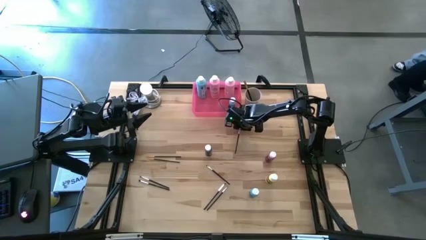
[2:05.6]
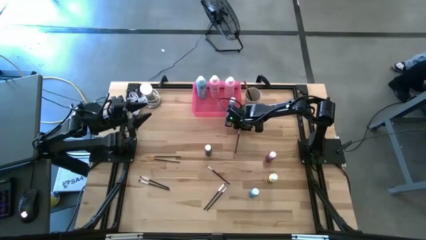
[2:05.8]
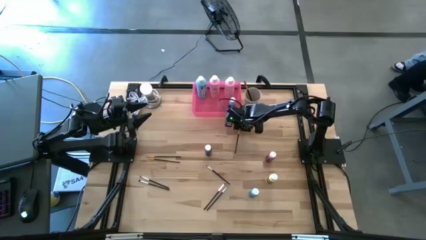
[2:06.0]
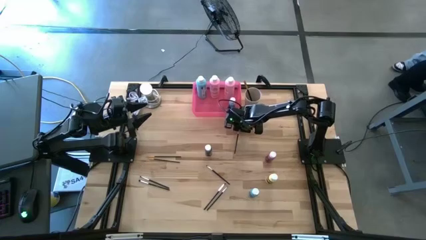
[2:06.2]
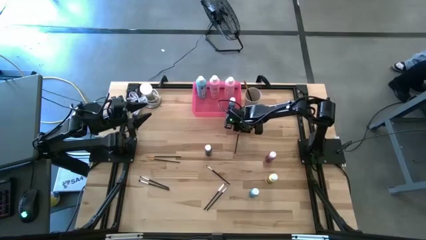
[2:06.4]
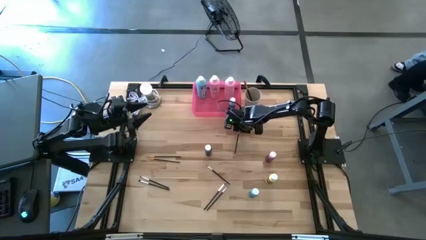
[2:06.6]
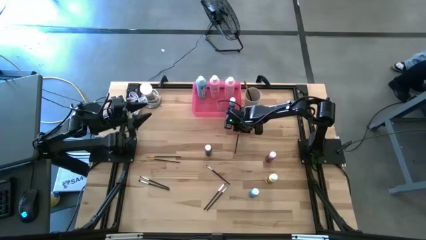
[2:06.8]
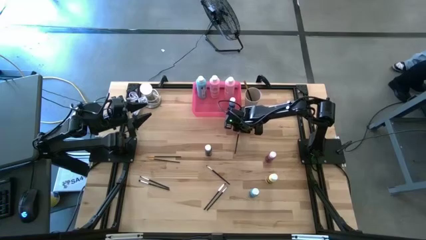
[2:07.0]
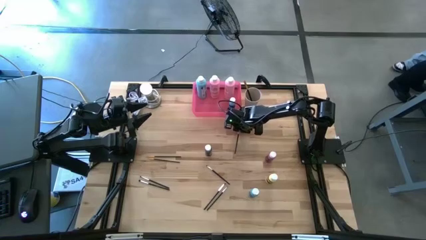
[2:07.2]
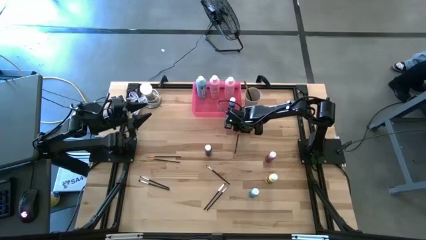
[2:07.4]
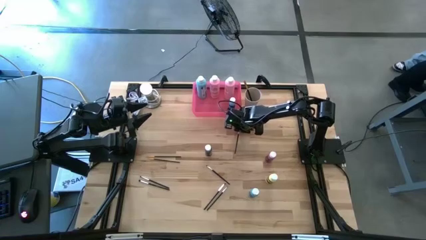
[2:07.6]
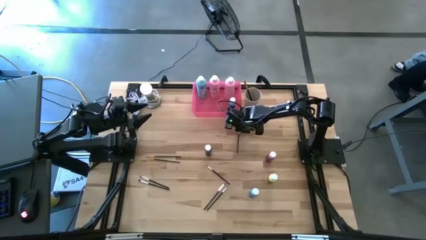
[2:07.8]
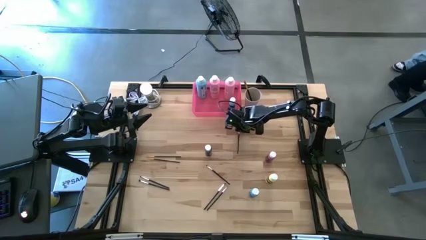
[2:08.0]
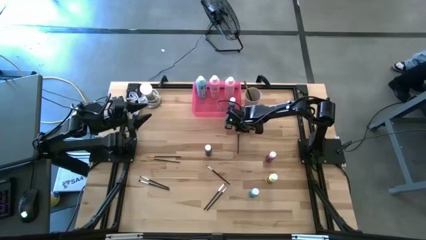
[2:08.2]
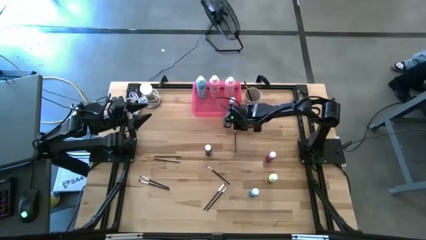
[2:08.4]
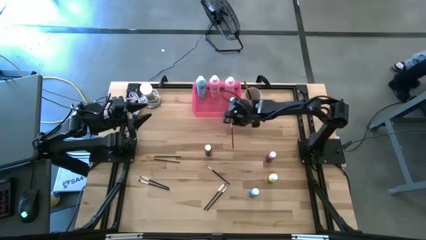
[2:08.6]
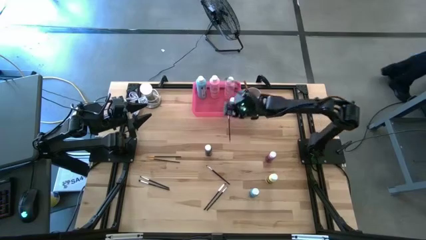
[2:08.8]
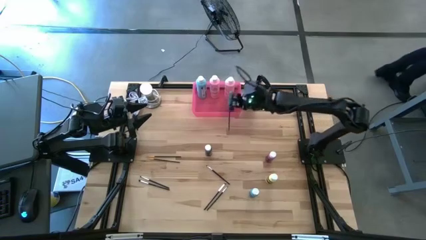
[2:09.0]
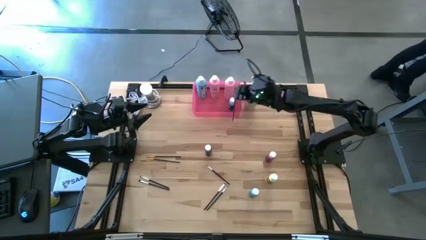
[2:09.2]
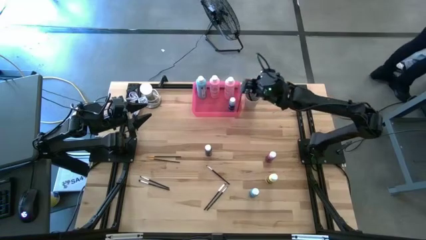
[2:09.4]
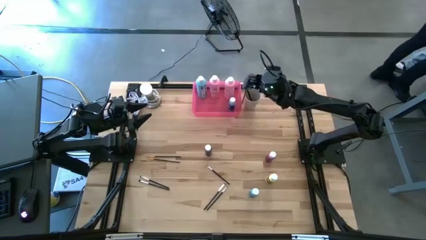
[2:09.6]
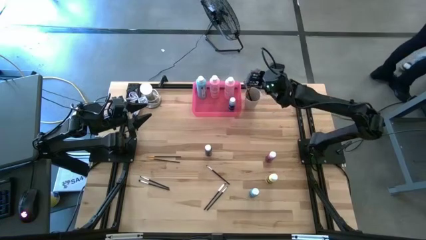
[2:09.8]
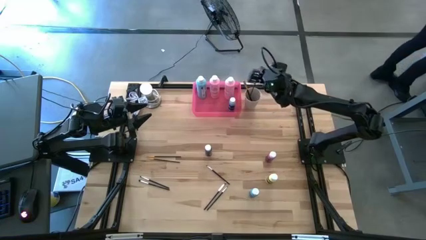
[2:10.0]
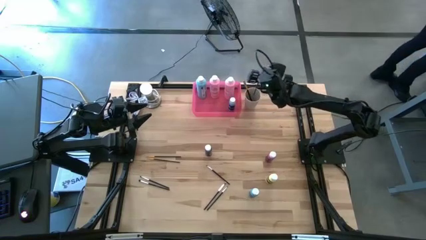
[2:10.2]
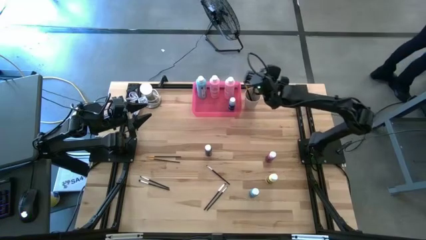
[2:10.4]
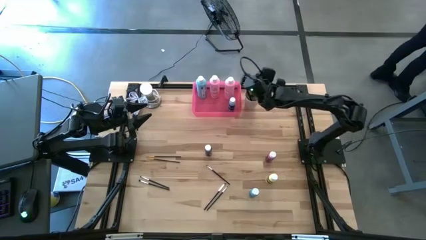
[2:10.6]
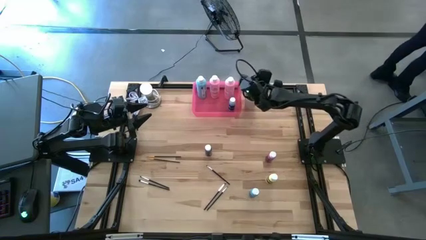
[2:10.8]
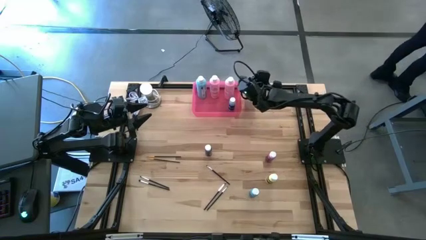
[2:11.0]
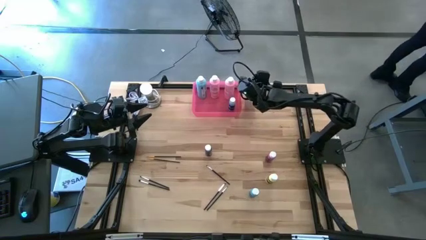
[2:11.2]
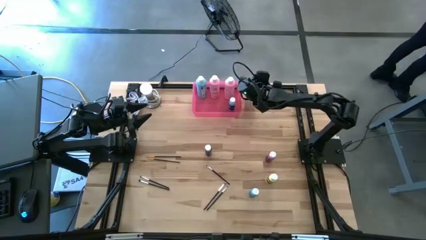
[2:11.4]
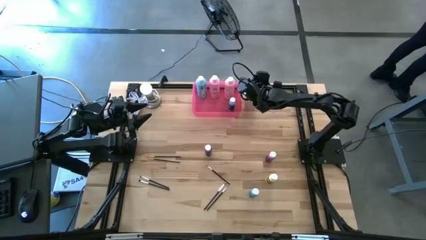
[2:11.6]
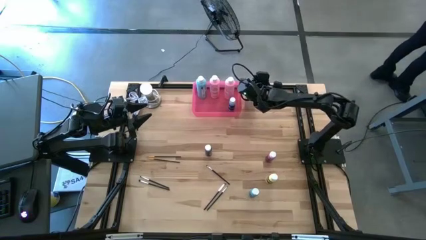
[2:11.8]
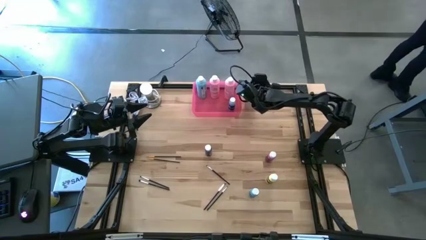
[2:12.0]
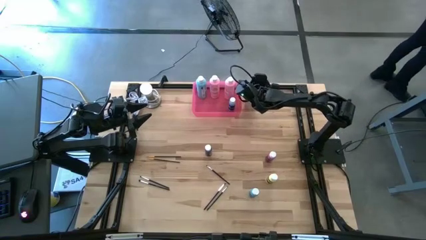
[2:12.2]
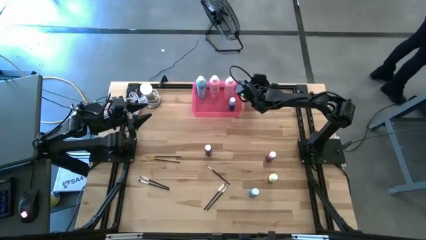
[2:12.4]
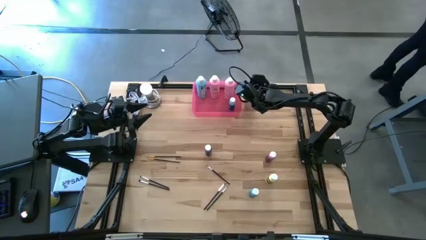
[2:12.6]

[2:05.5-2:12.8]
Task: Pick & Place Paint Supplies
Put the silver paintbrush into the white cup

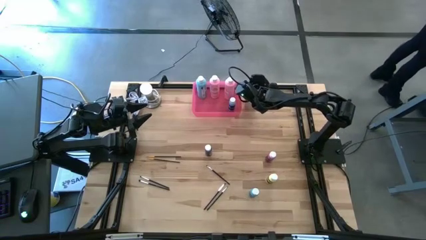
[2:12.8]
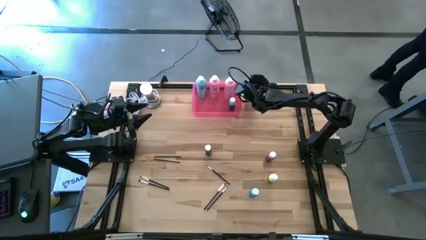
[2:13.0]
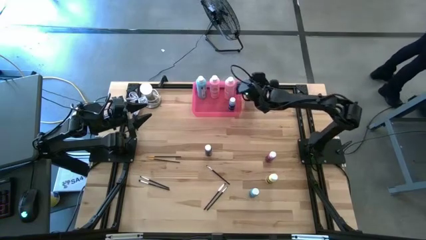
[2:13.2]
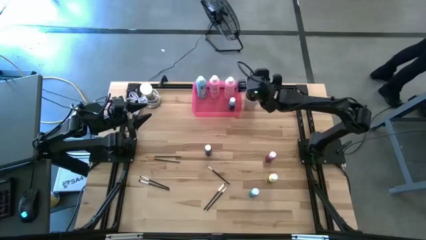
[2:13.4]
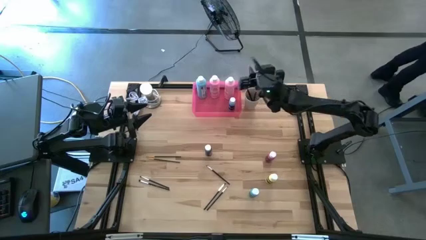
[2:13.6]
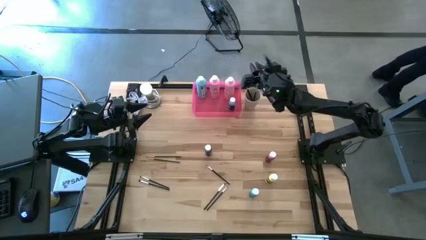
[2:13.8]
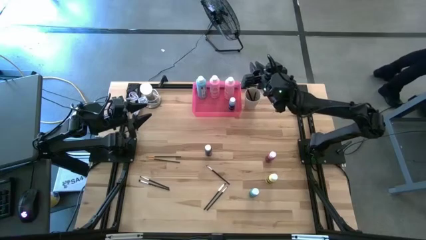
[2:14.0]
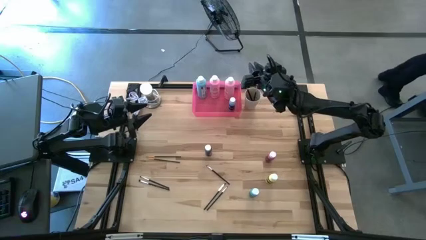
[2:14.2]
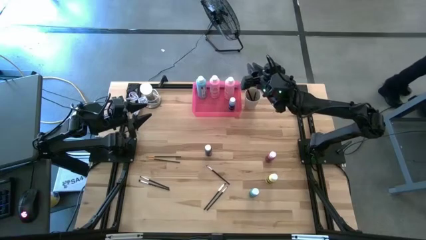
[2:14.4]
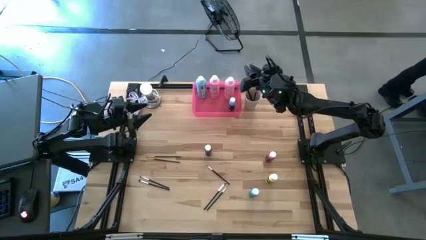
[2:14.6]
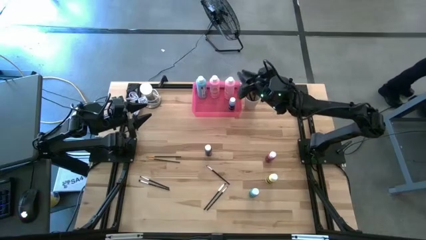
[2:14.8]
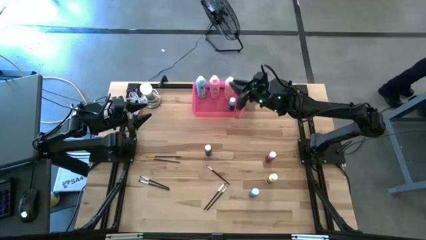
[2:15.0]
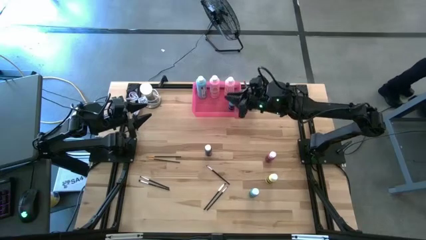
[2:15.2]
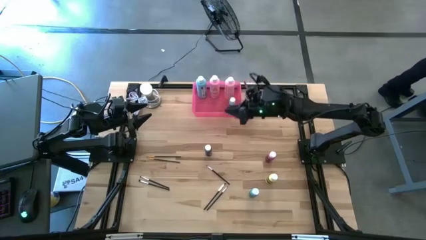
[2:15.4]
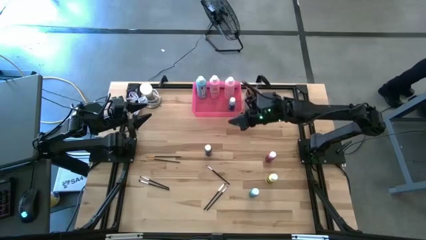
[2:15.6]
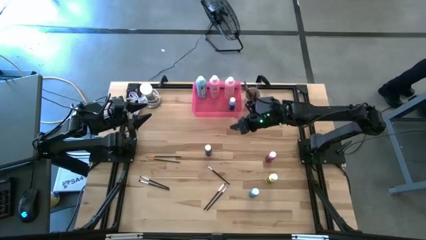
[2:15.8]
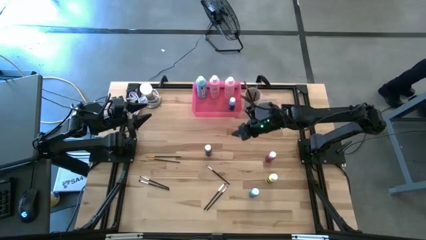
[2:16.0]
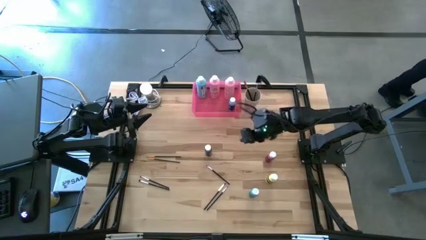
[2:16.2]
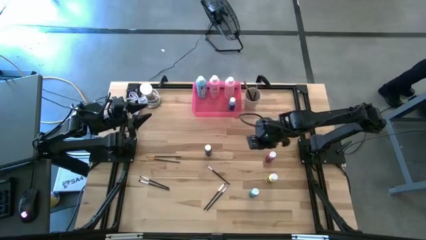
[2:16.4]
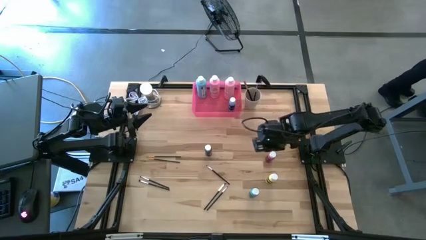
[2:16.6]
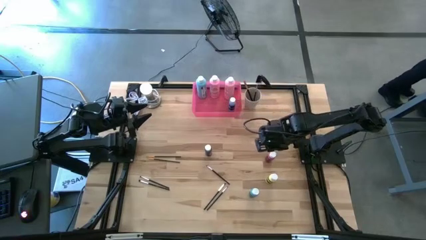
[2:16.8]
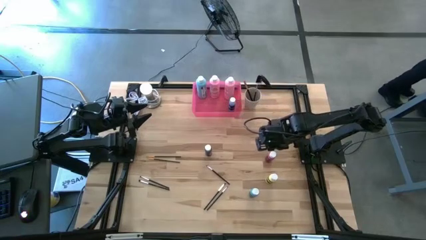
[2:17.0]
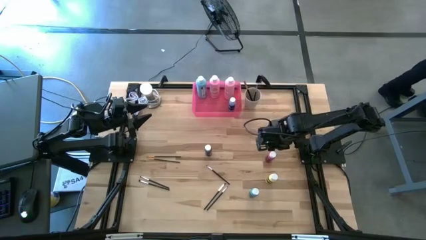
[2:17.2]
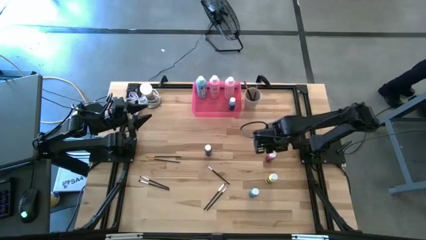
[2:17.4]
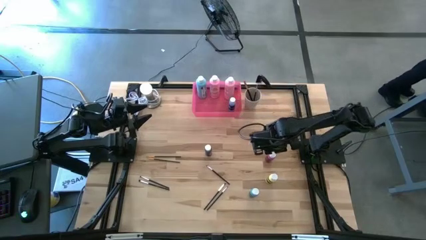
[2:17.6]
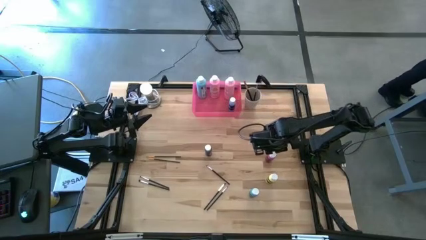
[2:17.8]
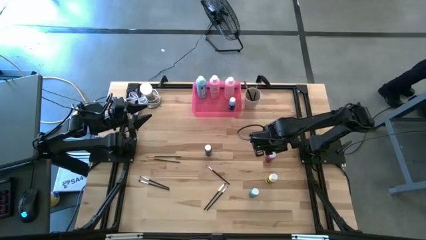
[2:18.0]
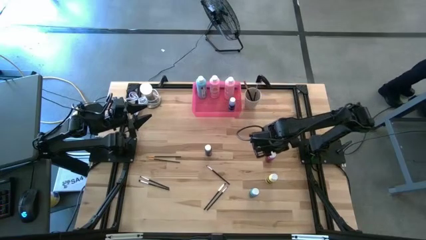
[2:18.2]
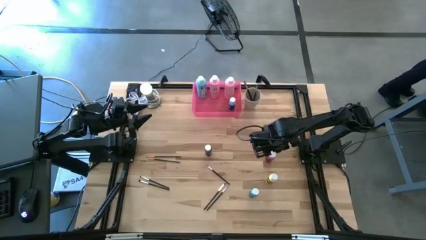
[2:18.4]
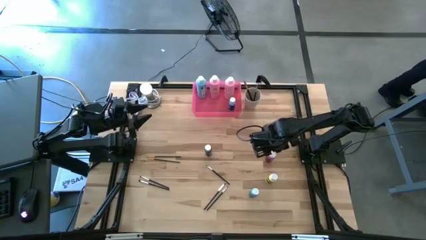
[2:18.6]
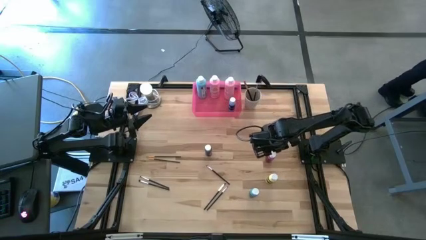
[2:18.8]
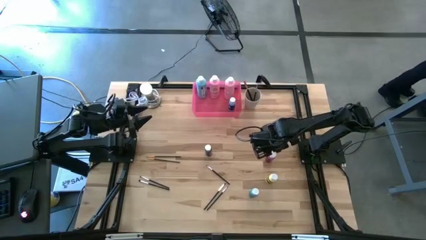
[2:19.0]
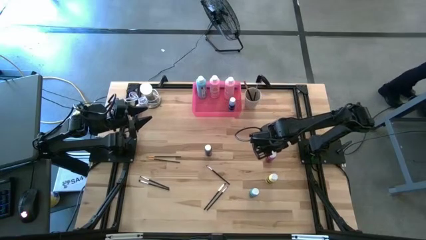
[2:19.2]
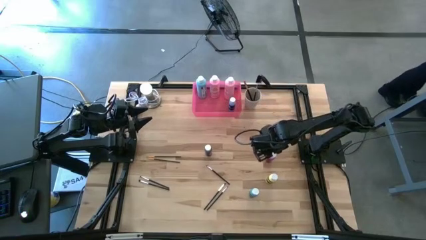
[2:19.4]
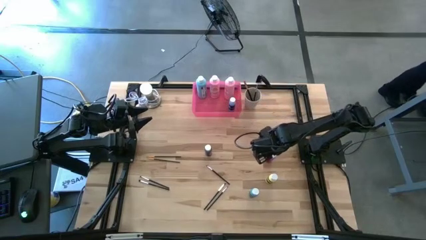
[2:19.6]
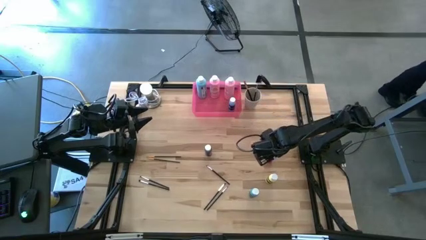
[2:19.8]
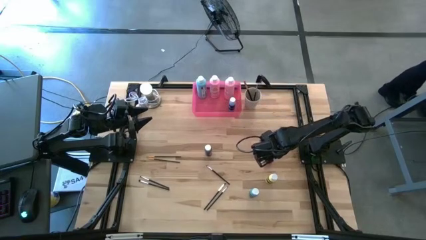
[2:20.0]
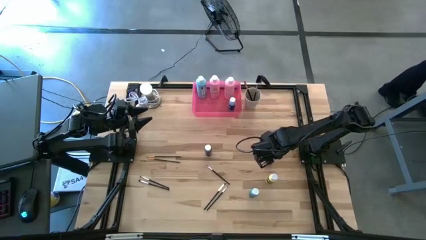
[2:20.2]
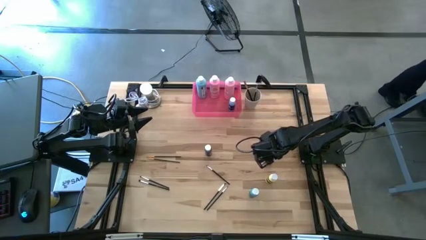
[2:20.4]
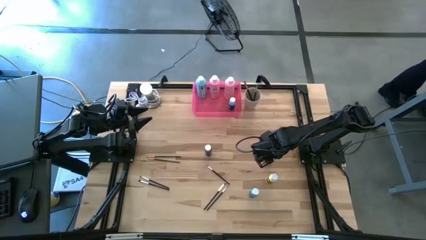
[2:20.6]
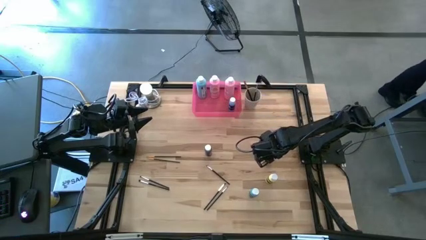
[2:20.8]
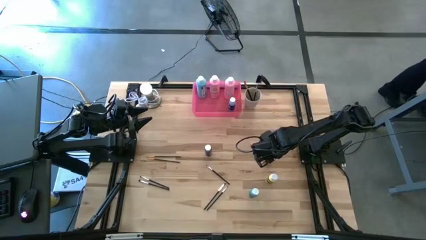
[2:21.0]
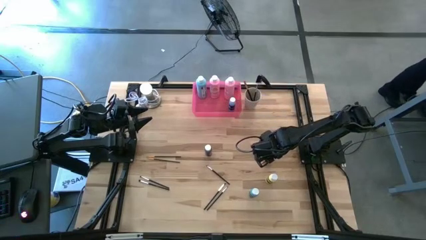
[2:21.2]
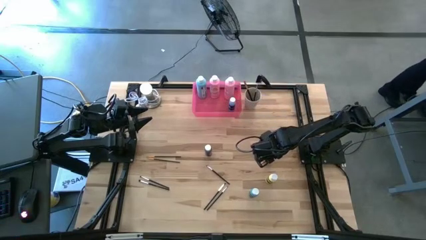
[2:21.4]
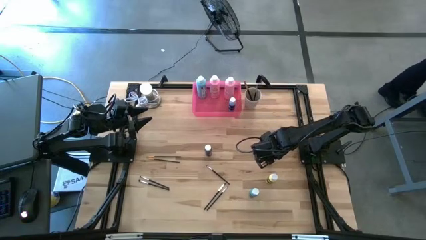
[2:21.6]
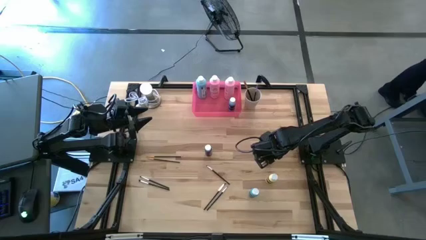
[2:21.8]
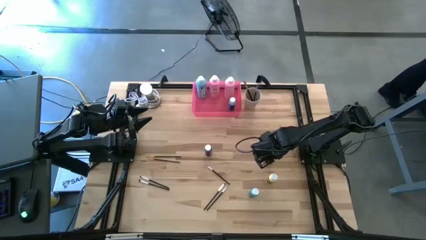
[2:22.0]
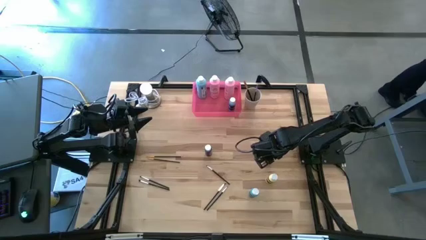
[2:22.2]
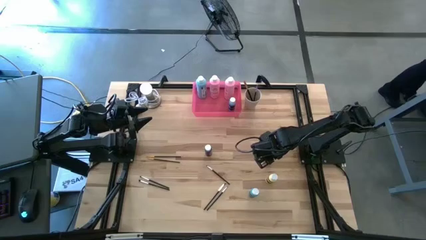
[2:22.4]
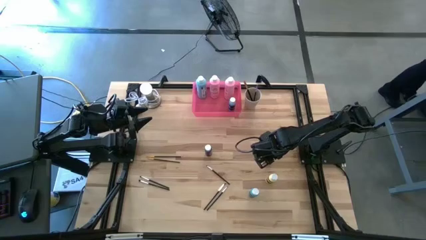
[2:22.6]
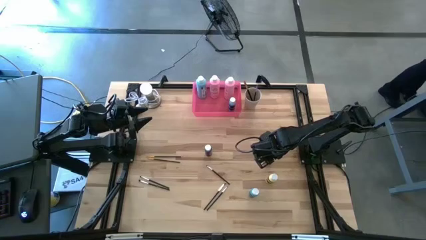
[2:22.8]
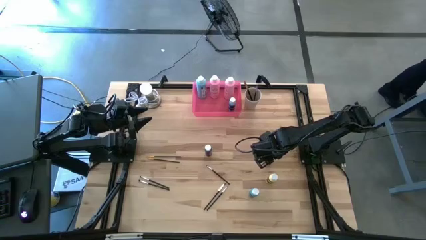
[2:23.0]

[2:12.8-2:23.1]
Put the small pink paint bottle into the pink bin
